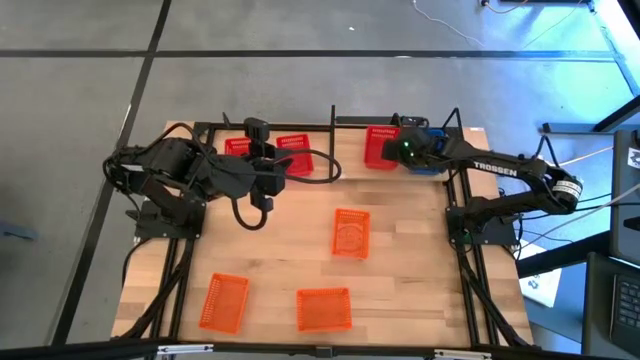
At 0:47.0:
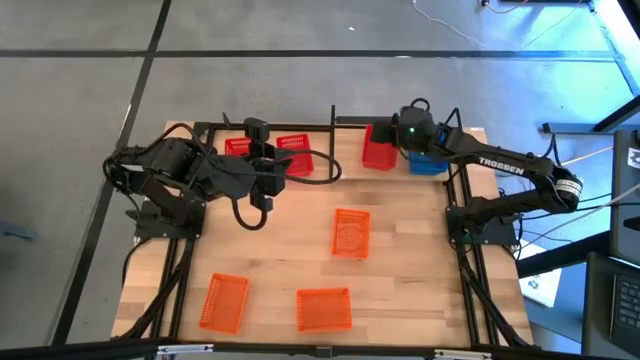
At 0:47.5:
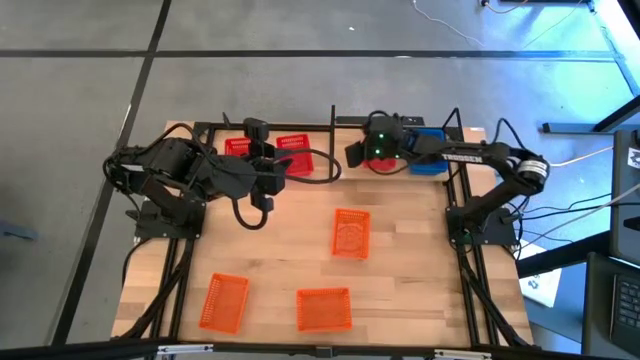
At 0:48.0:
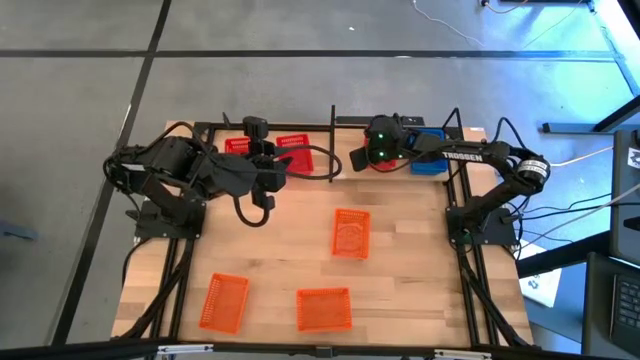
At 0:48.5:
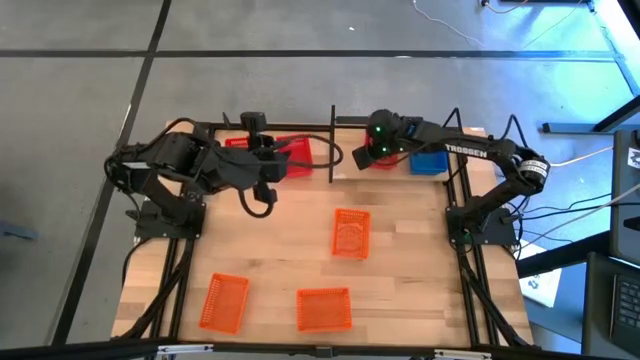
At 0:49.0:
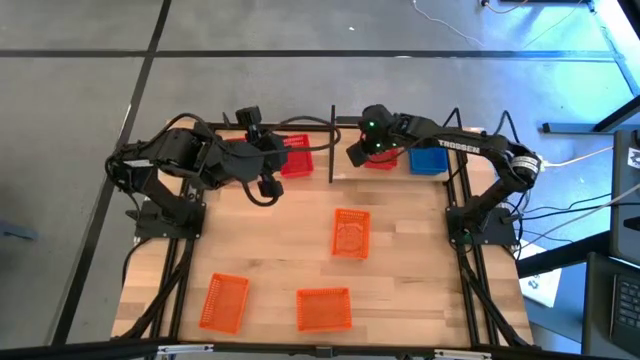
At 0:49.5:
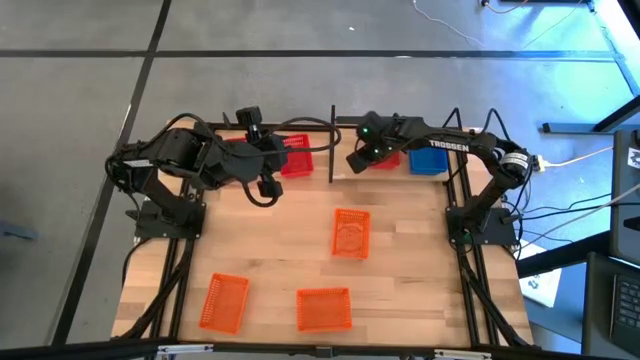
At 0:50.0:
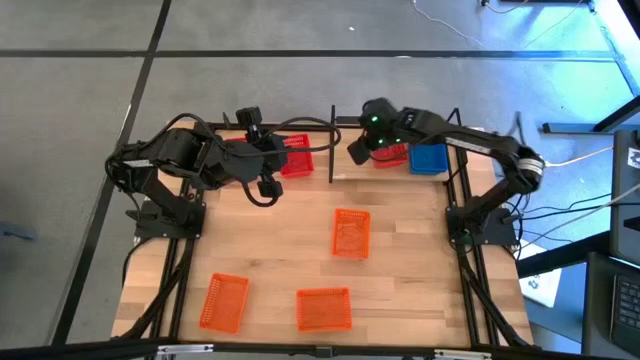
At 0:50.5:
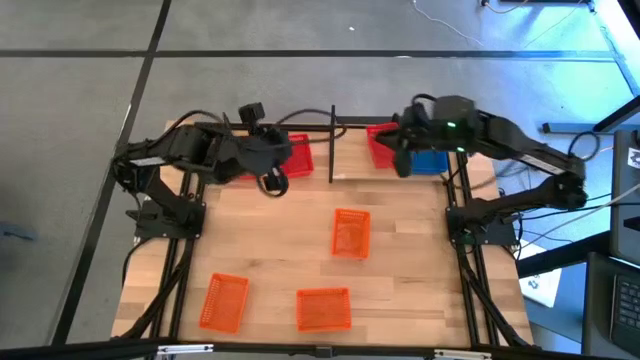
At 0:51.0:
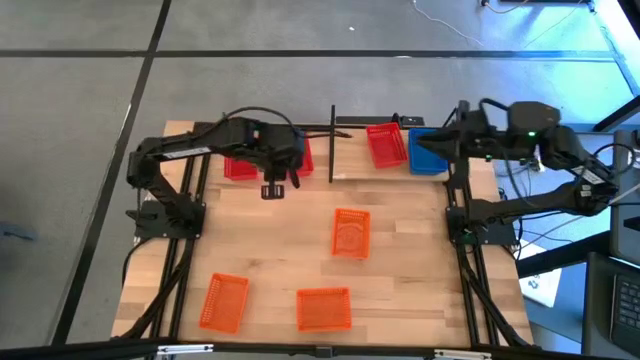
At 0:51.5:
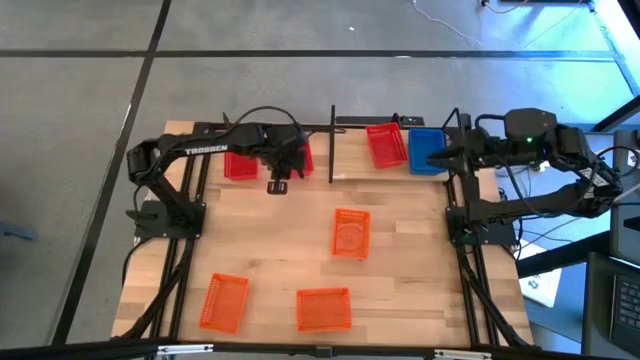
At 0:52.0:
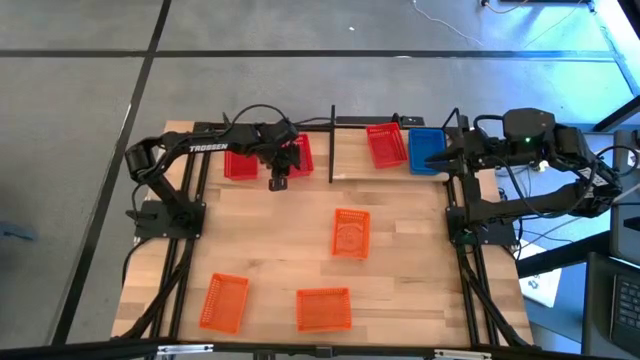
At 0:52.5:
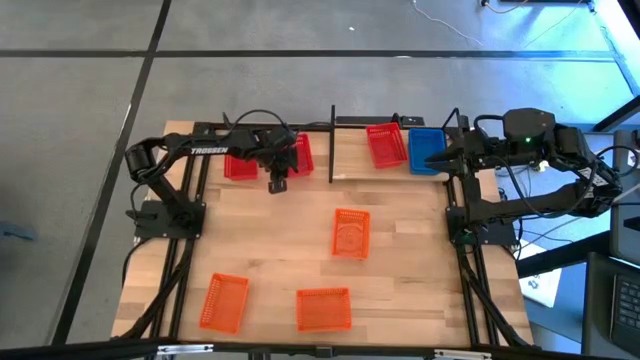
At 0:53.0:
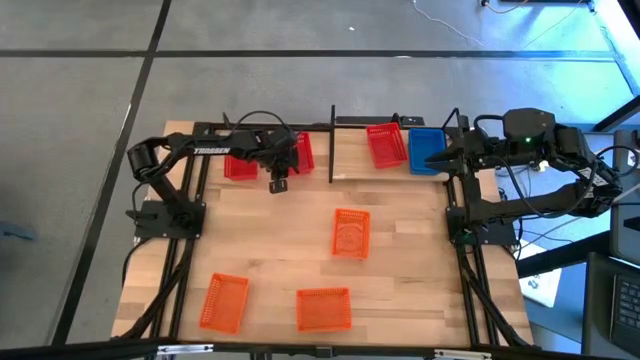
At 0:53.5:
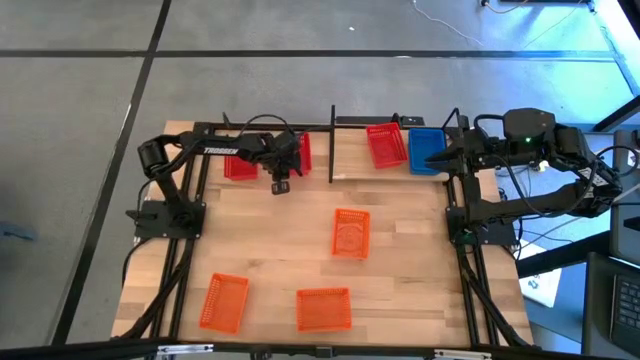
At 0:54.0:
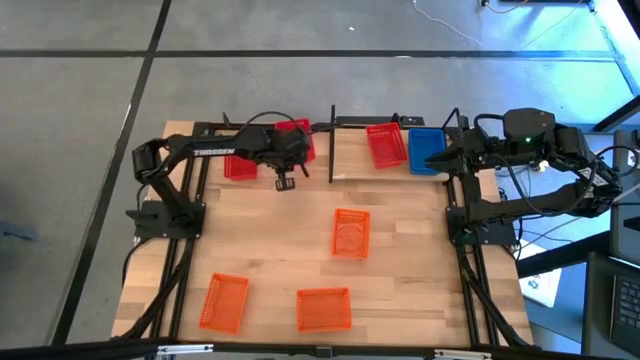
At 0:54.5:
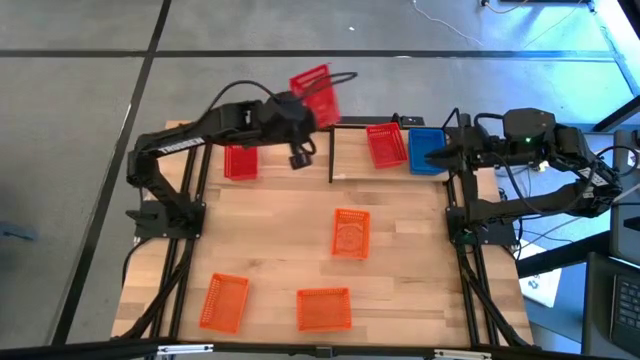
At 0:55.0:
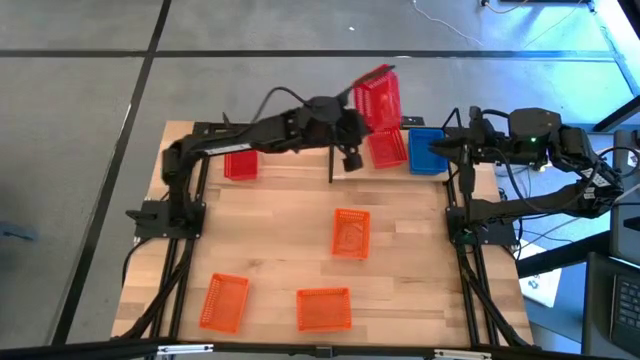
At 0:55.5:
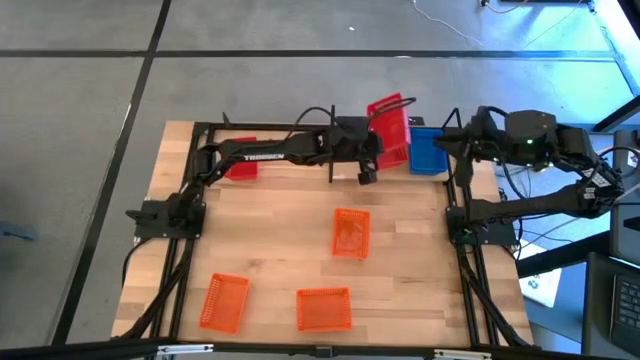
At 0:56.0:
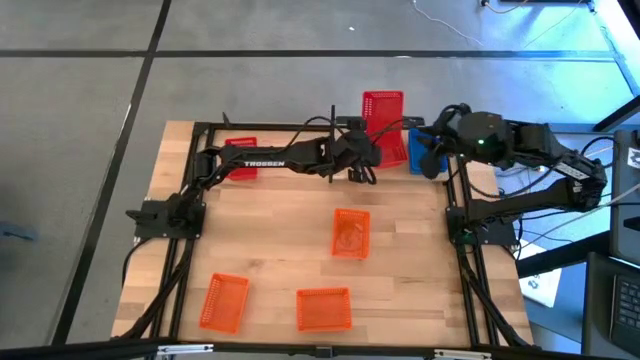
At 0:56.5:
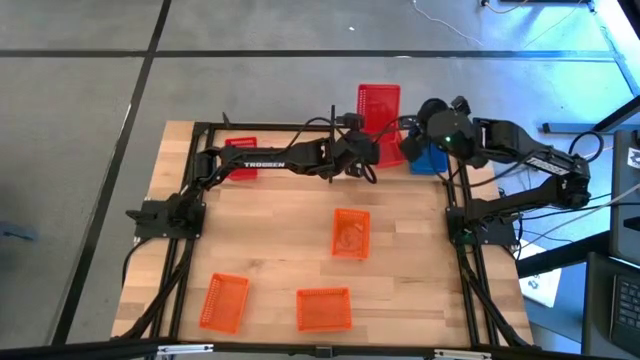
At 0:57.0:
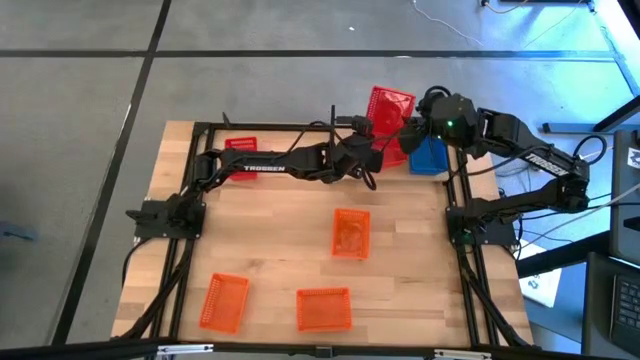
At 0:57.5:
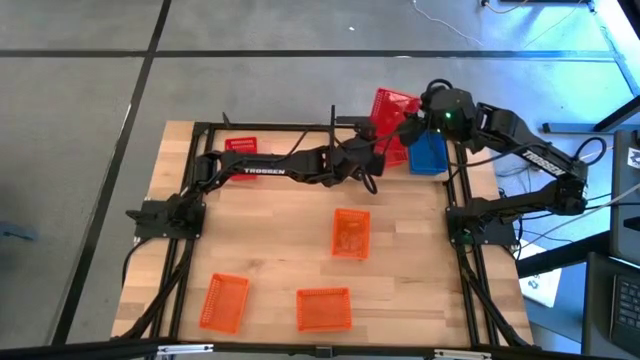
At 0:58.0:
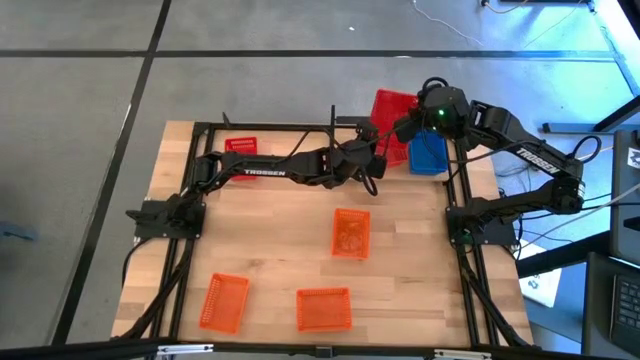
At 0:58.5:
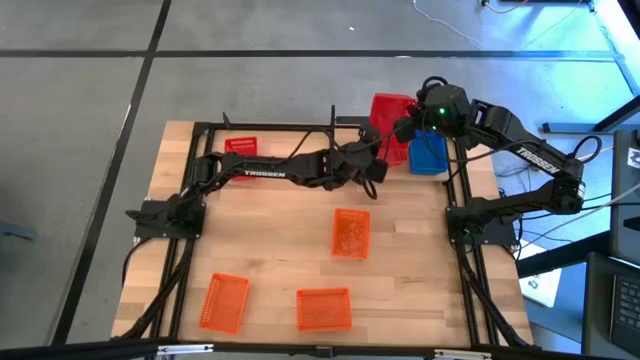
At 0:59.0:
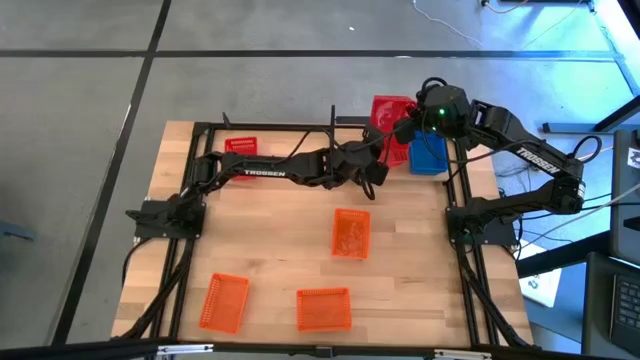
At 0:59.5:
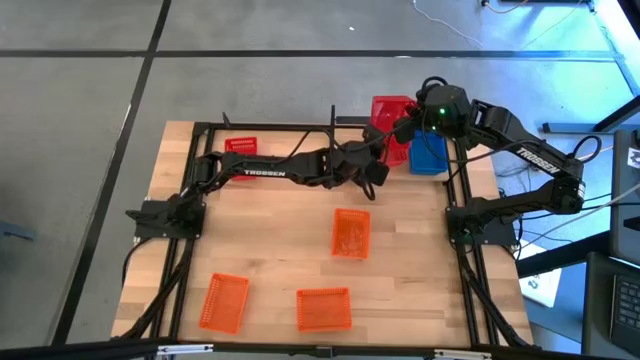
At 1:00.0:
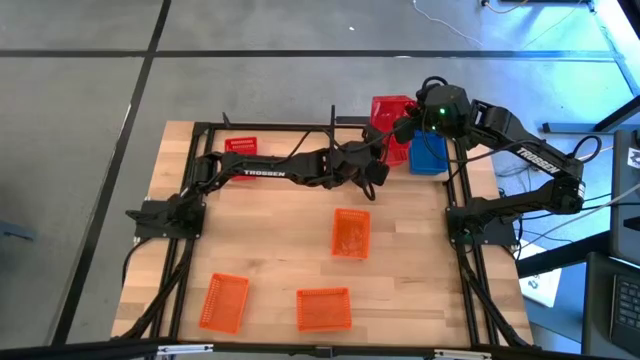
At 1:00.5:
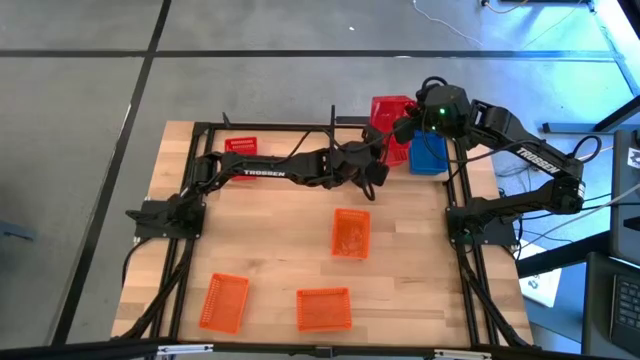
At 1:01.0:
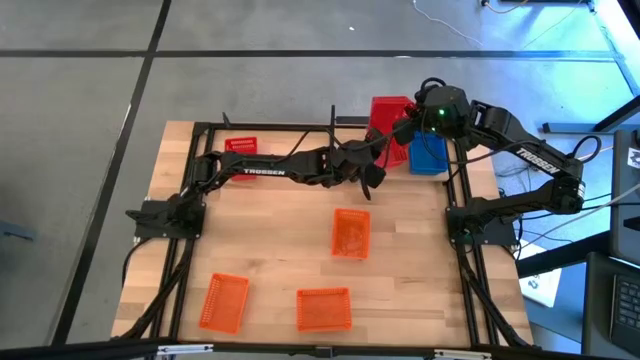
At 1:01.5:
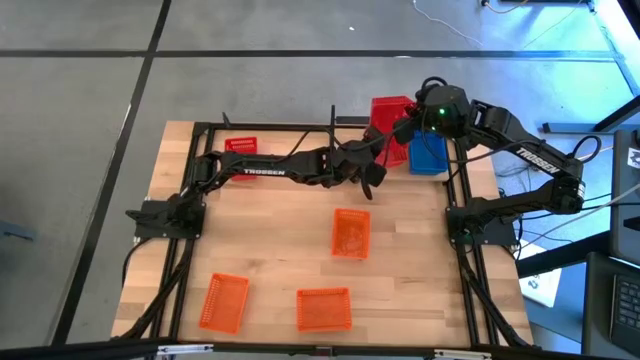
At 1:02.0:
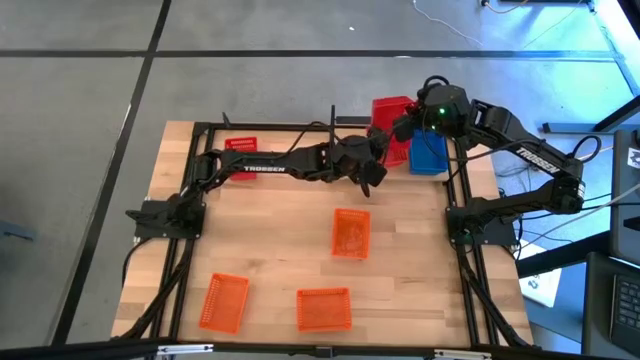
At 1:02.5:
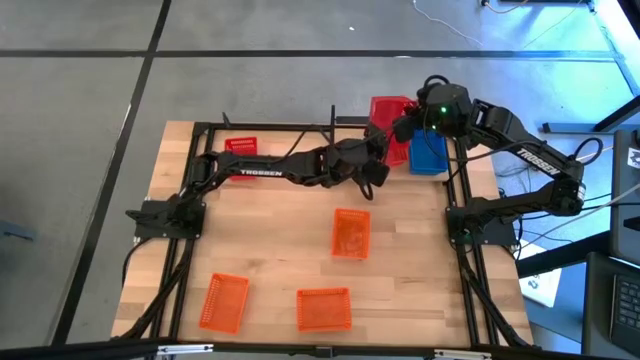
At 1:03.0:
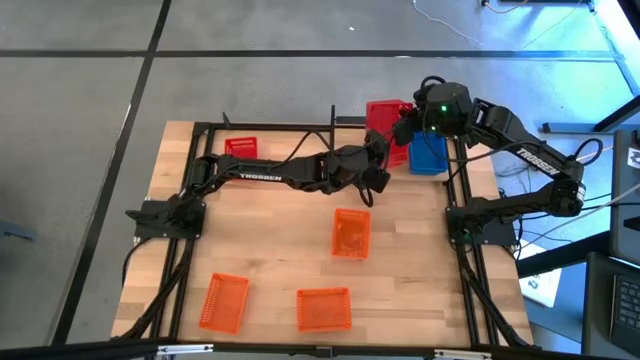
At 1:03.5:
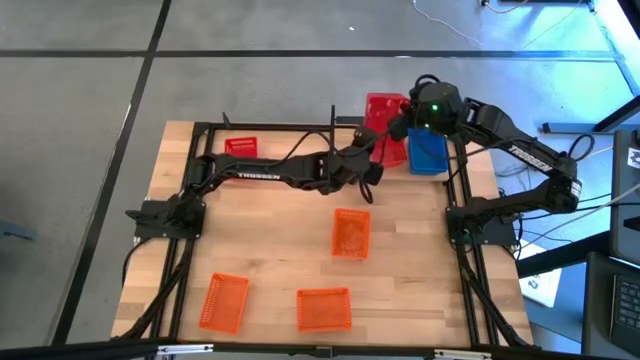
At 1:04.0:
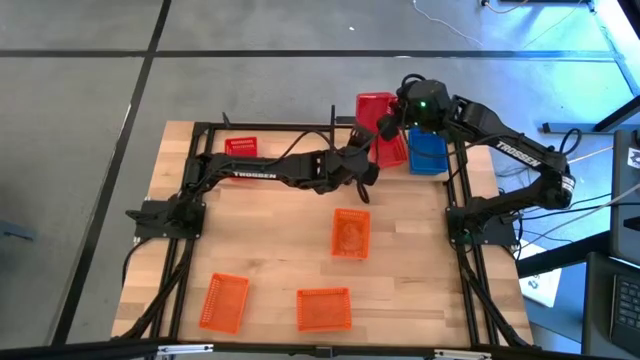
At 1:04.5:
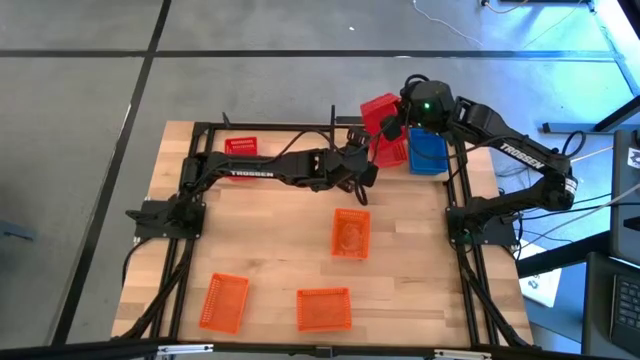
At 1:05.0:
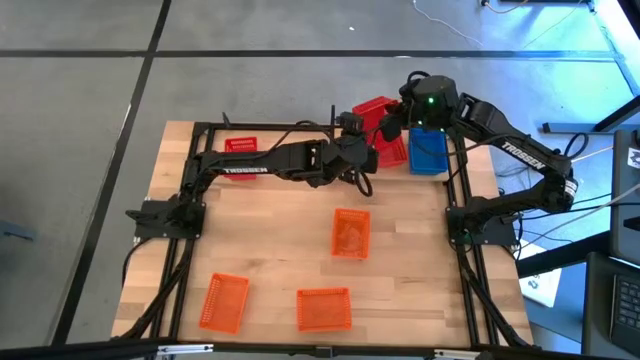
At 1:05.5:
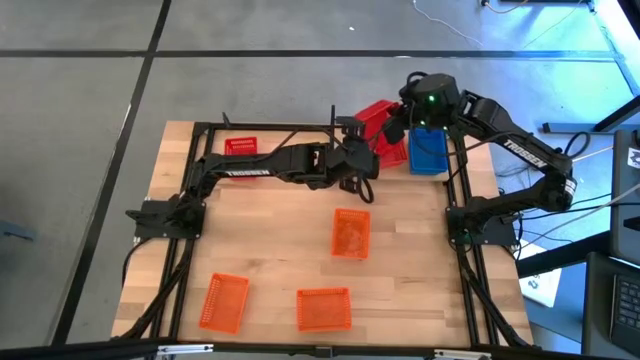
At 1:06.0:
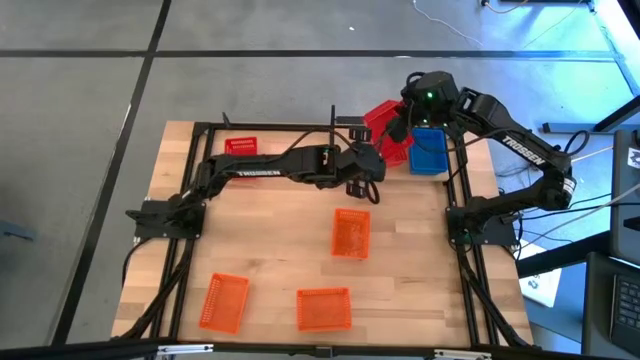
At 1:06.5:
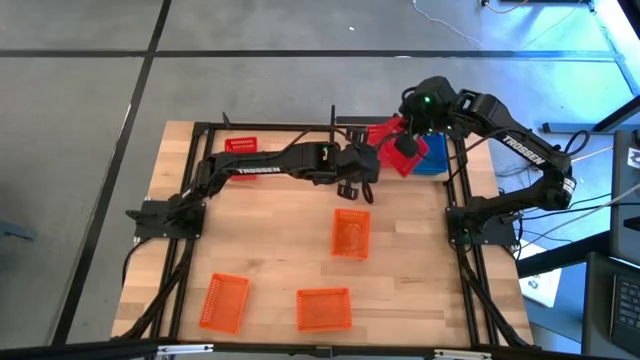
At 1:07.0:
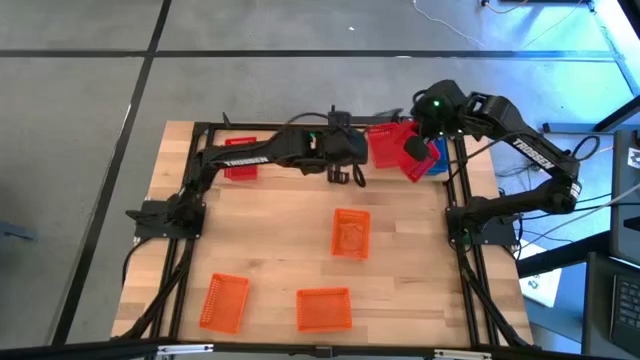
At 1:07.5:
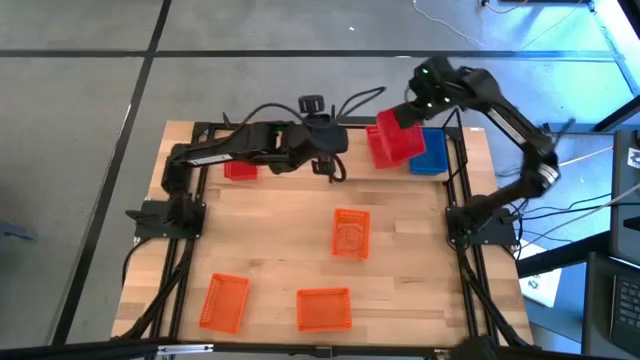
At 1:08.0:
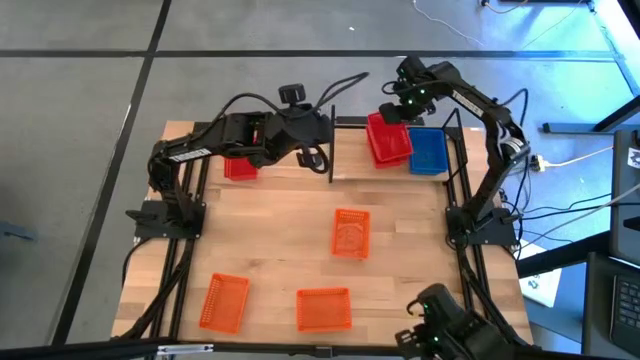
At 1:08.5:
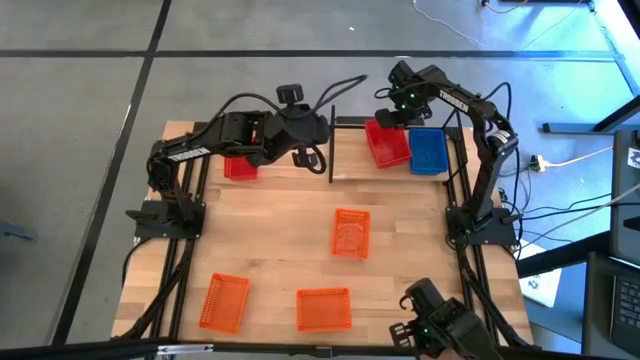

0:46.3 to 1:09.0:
Task: Stack baskets on shelf by color
Stack the right red basket on top of the red basket on the shelf
